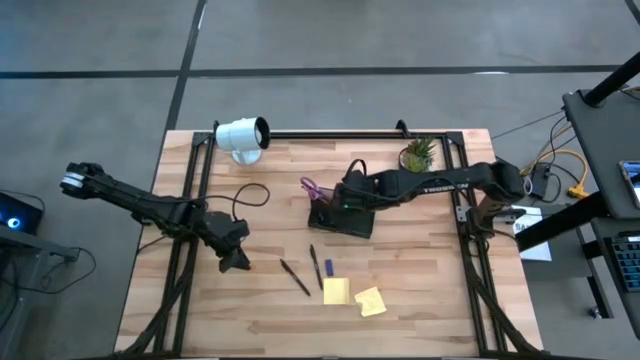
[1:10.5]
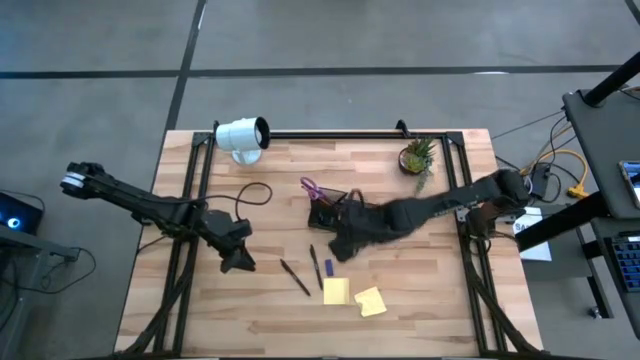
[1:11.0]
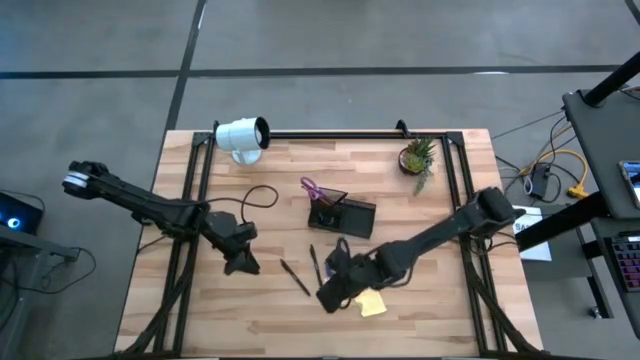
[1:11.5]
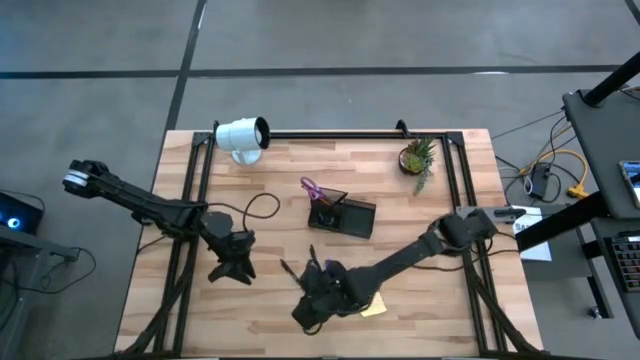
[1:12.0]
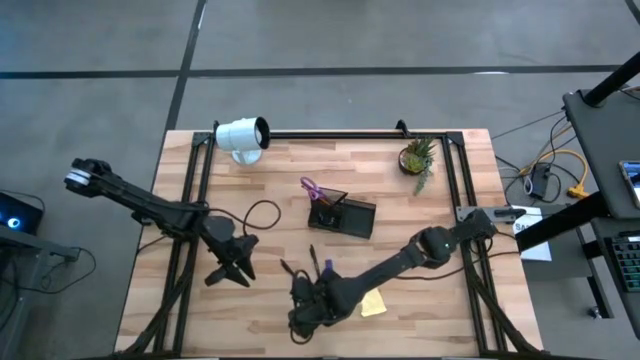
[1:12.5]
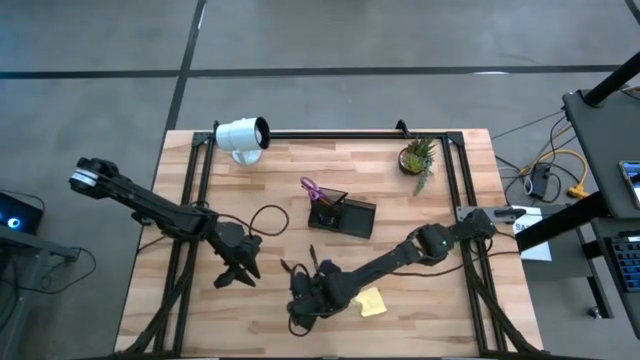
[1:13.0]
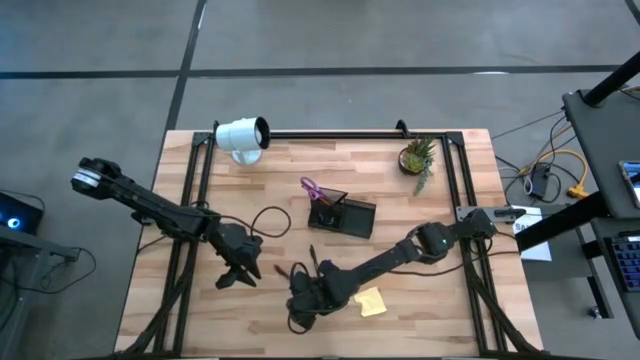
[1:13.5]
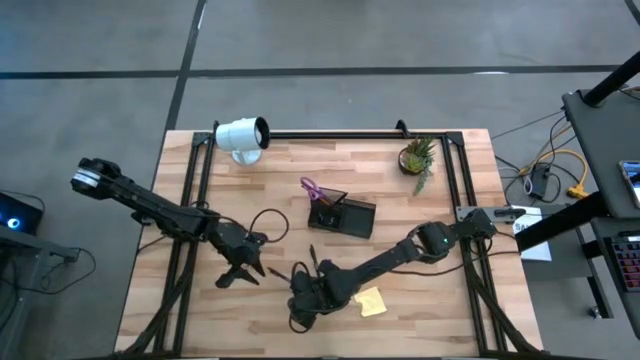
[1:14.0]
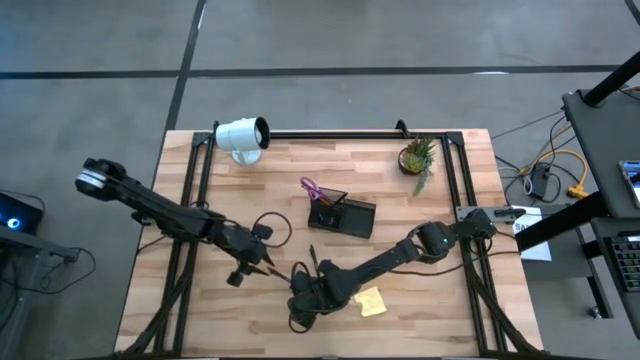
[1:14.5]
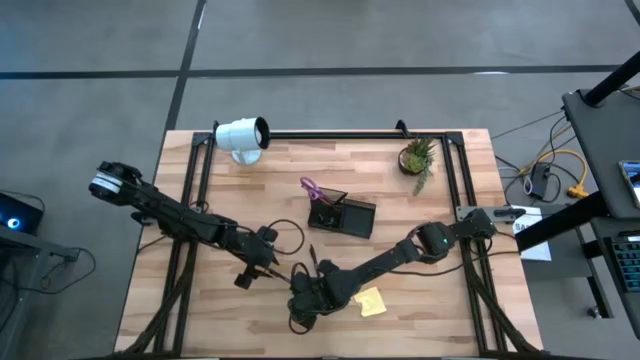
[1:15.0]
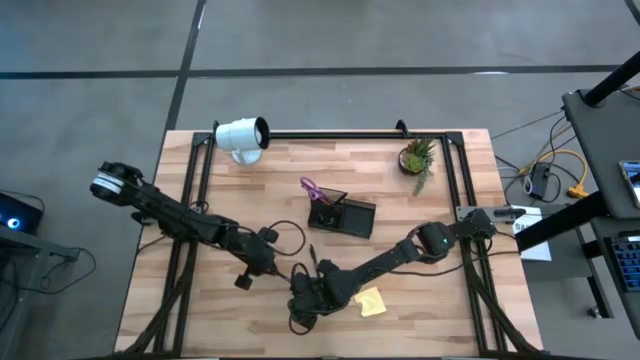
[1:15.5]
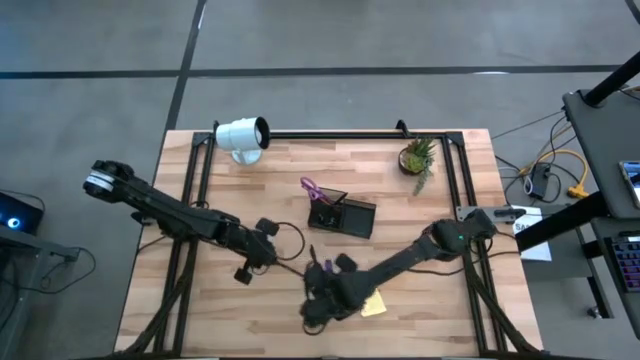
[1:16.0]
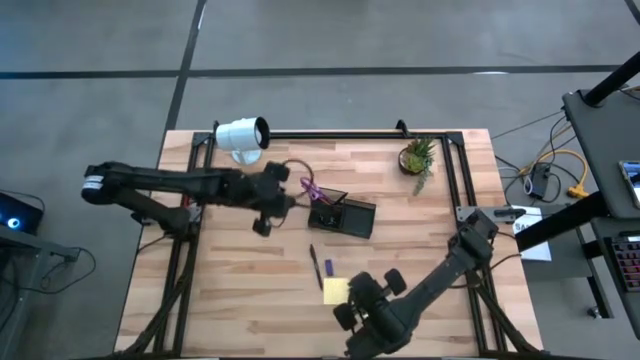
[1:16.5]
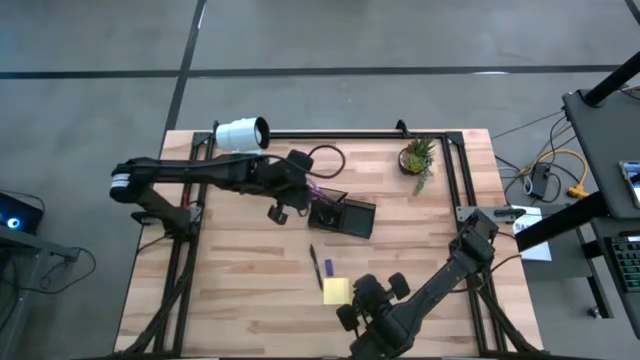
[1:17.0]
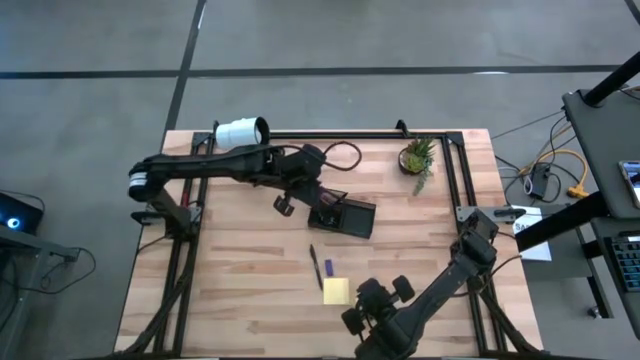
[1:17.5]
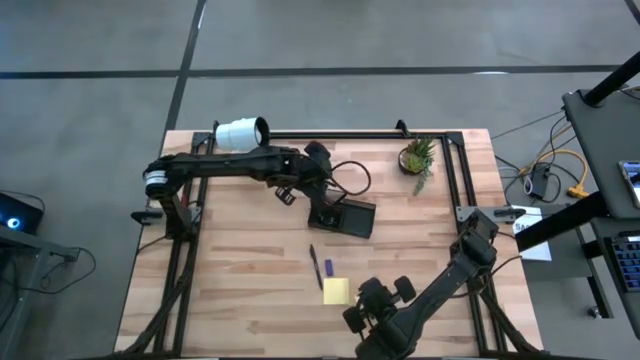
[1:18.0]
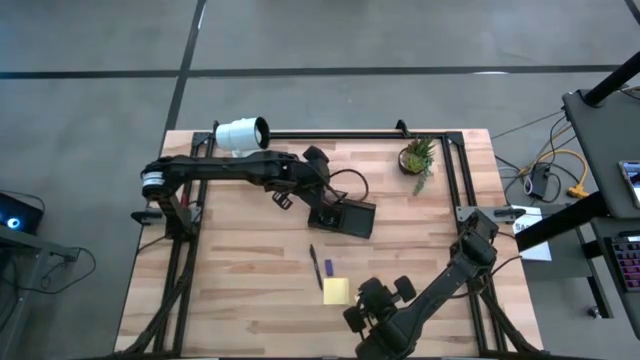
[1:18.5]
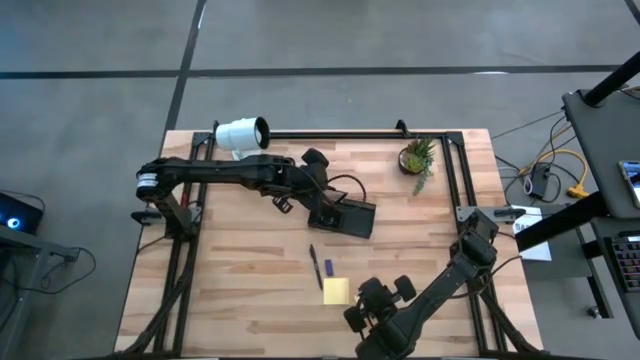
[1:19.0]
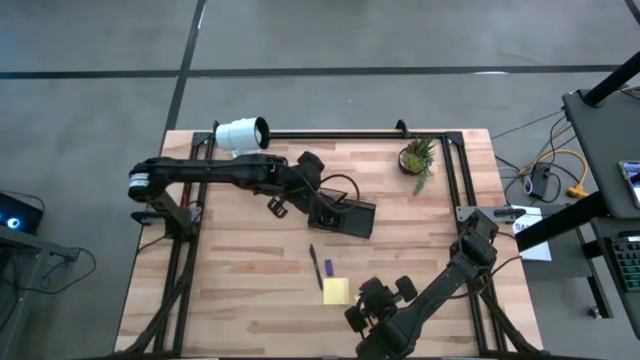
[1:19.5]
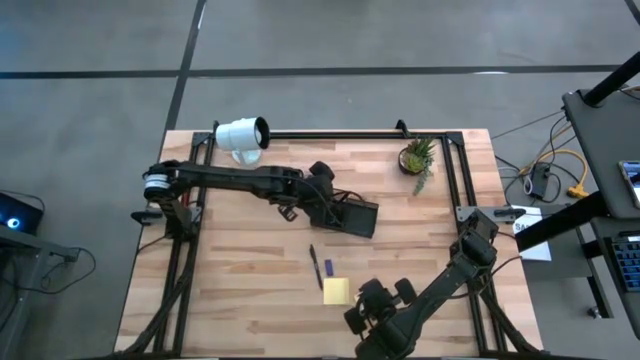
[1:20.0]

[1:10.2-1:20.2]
Task: Pick and place office supplies into organizer
Put the left black pen into the black desk organizer

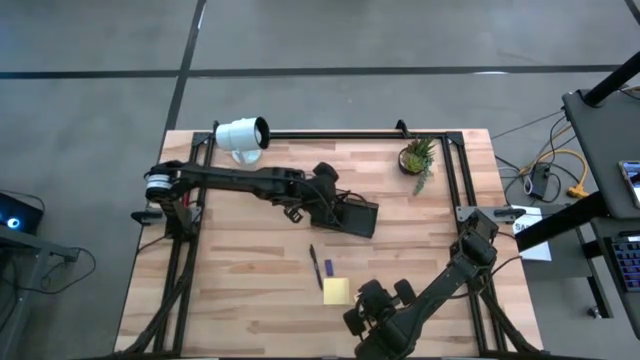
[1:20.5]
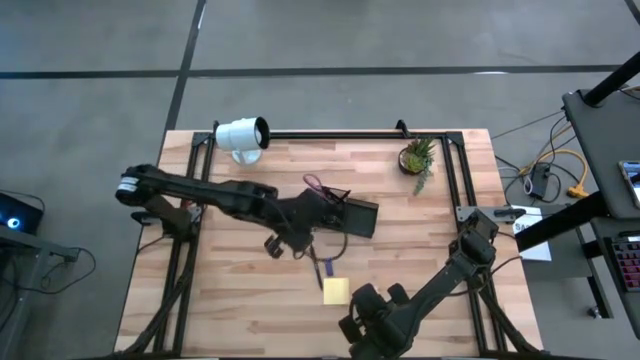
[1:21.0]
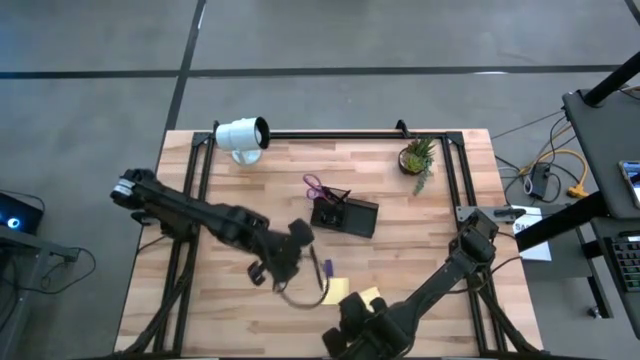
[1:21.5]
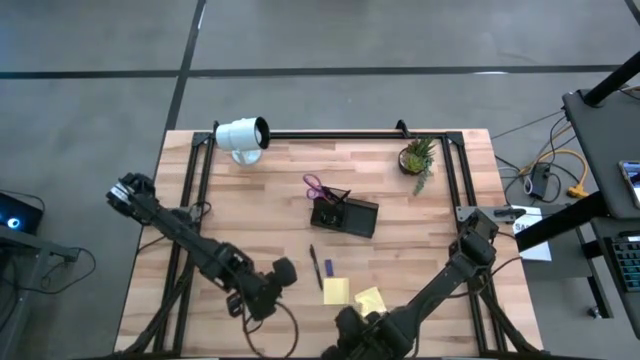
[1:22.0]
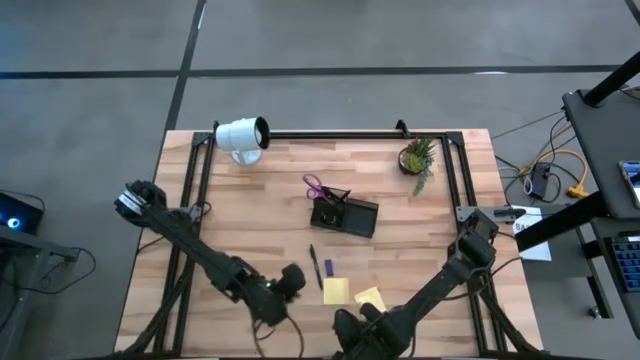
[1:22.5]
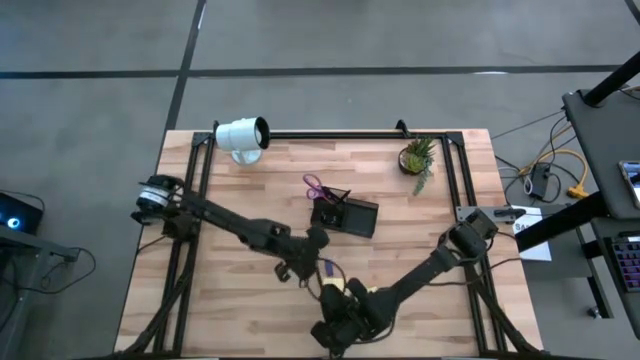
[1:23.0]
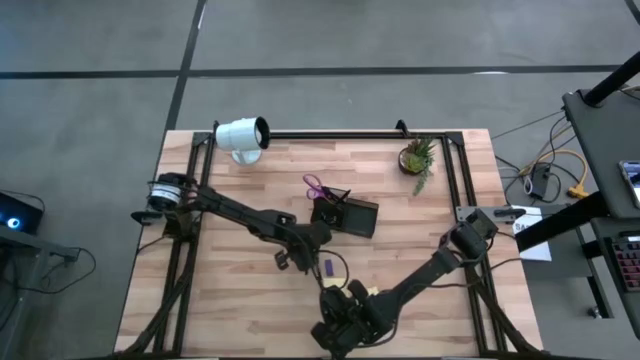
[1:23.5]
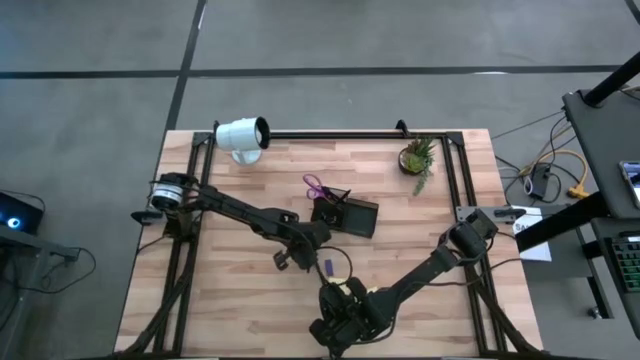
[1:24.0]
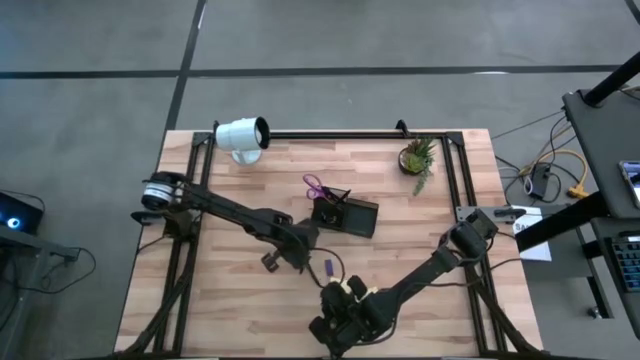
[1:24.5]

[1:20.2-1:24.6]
Put the black pen into the black desk organizer

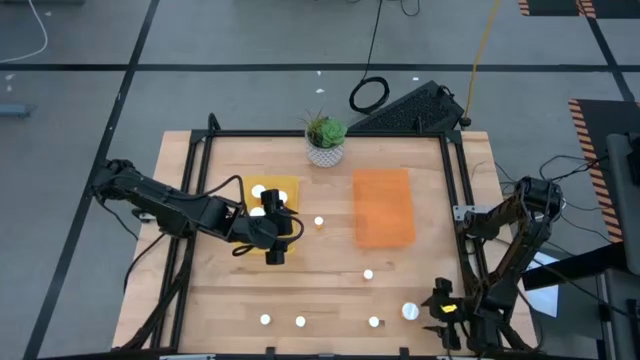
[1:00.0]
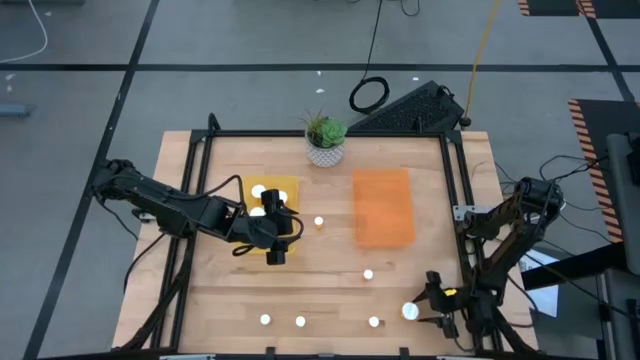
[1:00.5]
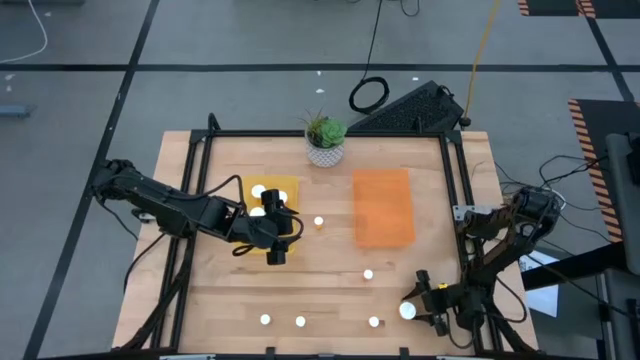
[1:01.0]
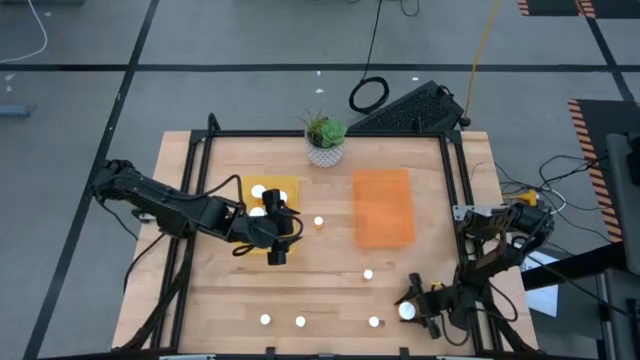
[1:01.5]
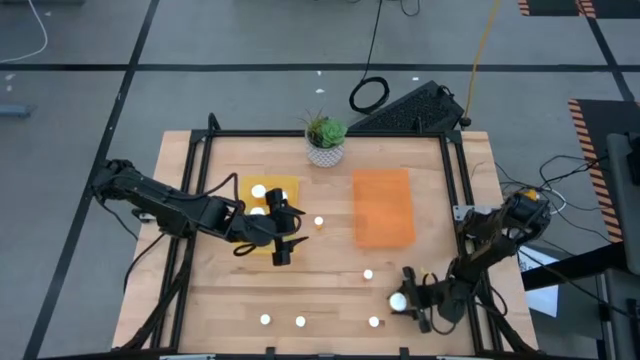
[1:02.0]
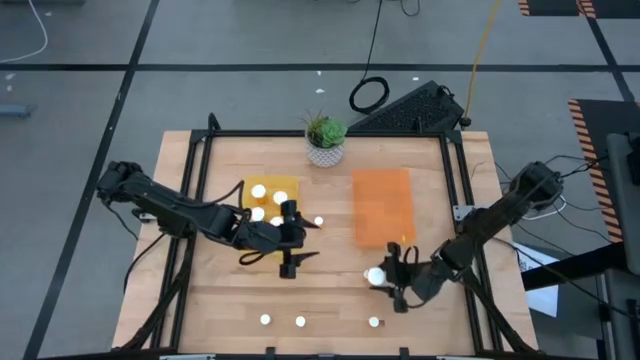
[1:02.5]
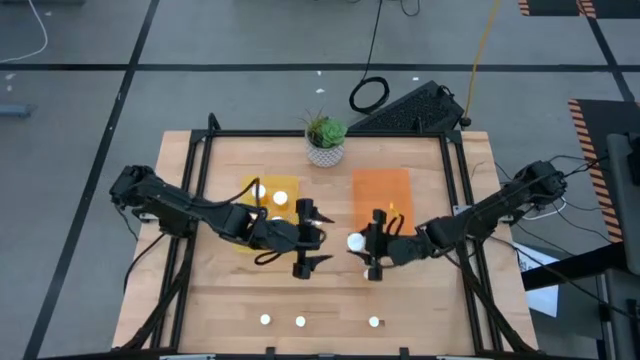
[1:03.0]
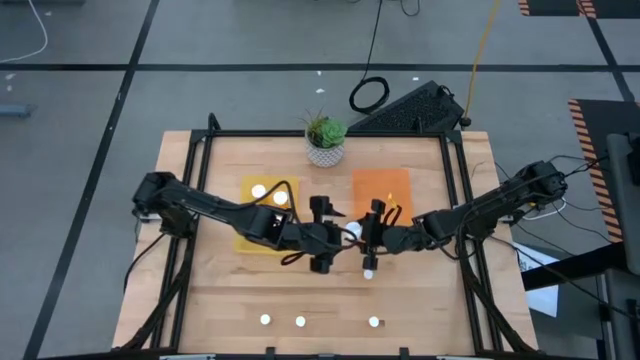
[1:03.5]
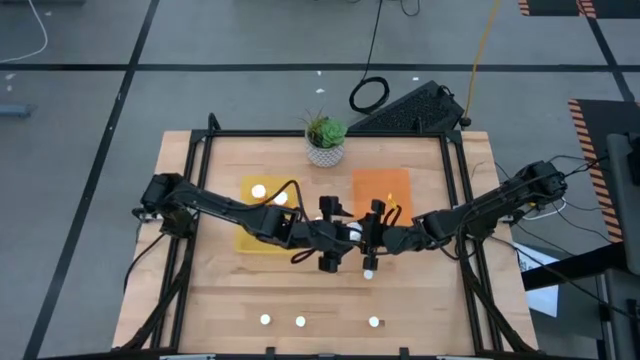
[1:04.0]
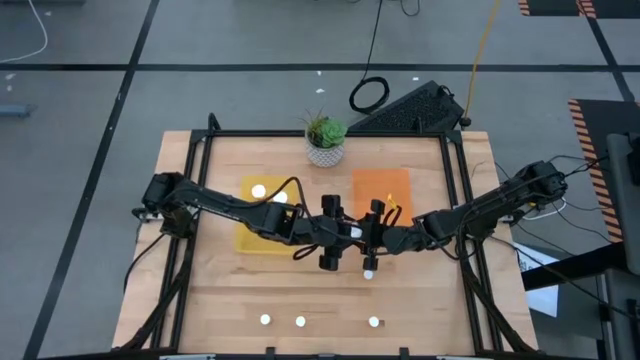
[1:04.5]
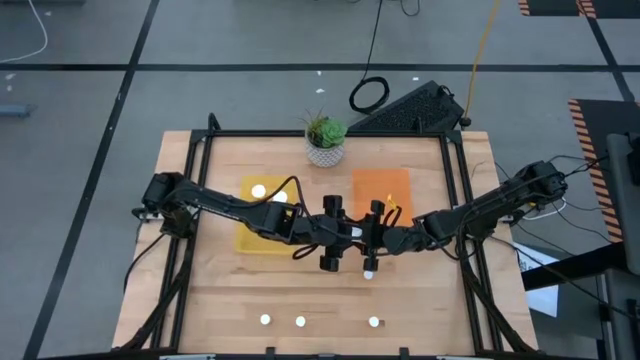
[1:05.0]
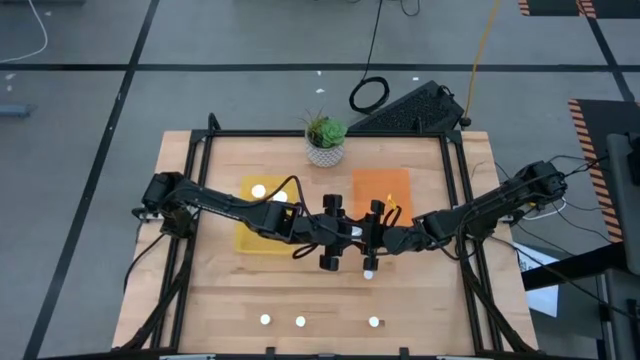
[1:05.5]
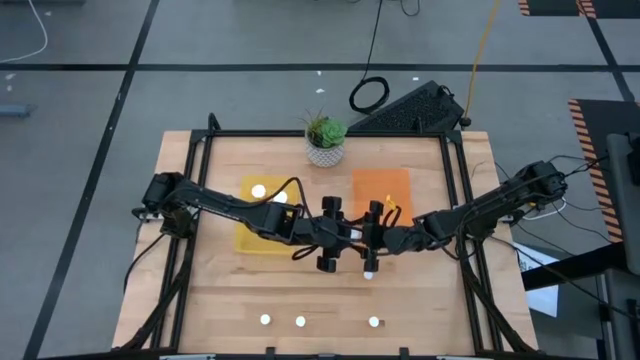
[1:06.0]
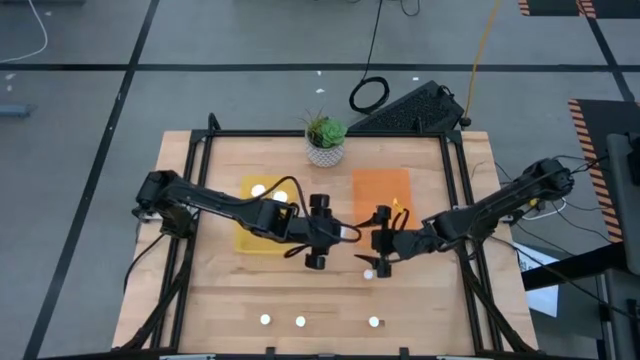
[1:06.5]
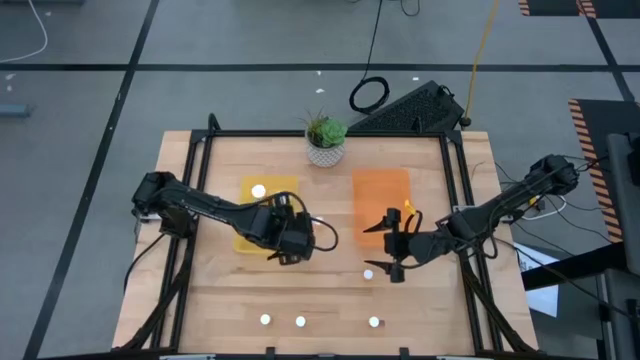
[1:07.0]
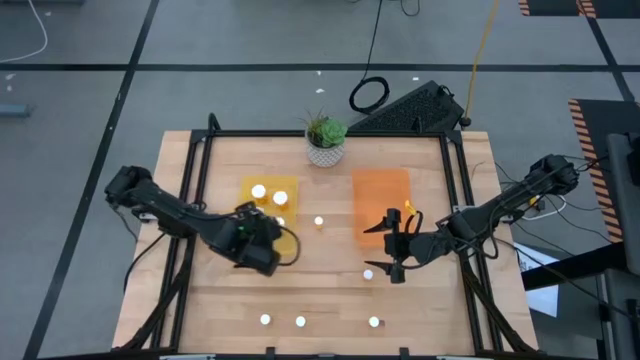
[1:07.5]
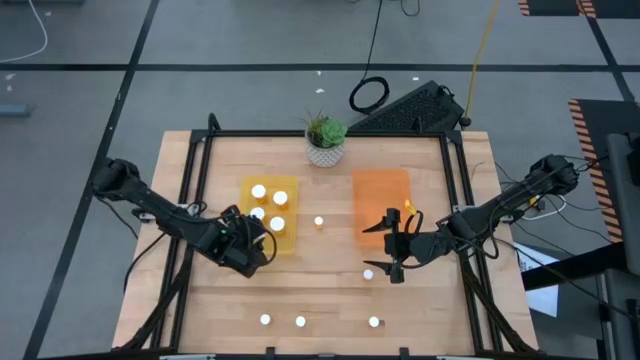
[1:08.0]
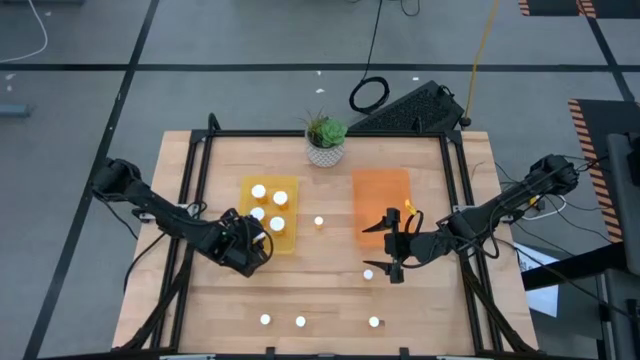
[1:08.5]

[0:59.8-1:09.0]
Task: Pick and place medicine bottles into bin by pill shape (circle, oval)
Put the large medicine bottle into the yellow bin
